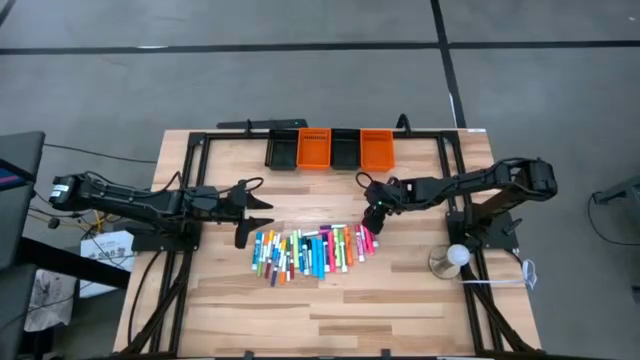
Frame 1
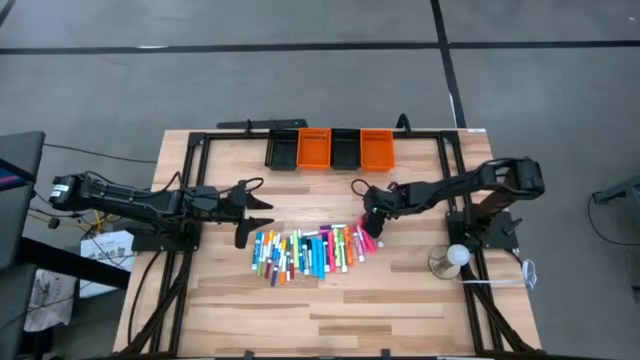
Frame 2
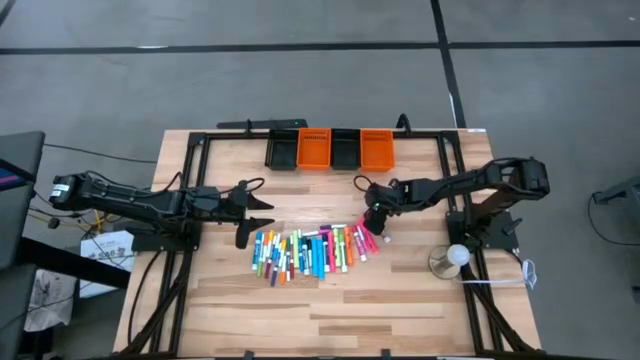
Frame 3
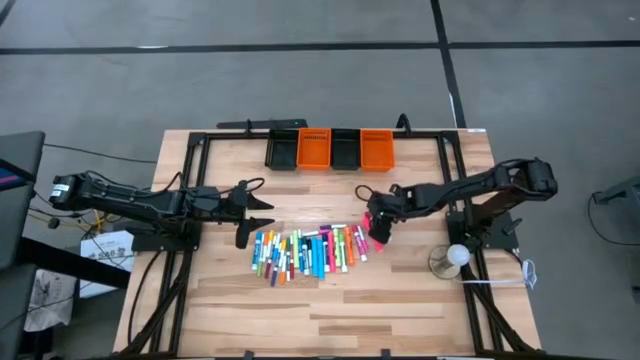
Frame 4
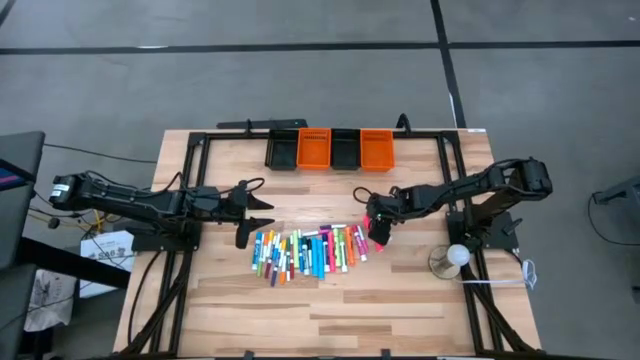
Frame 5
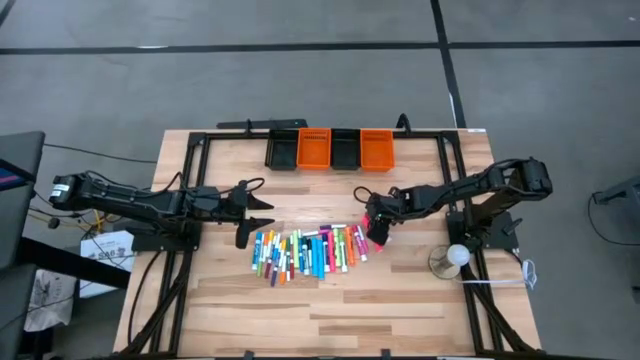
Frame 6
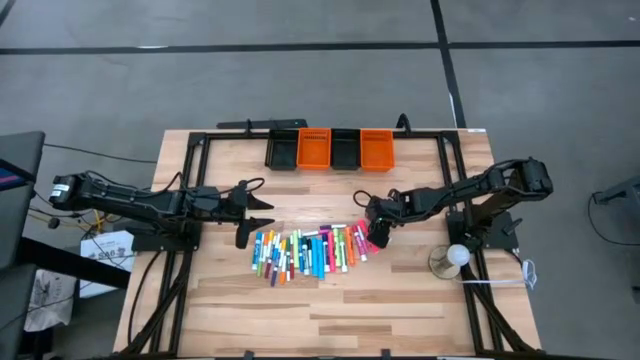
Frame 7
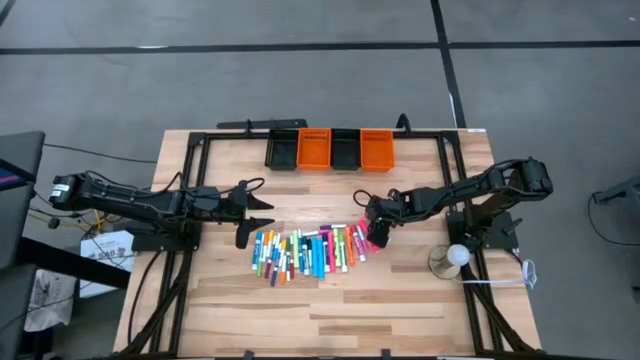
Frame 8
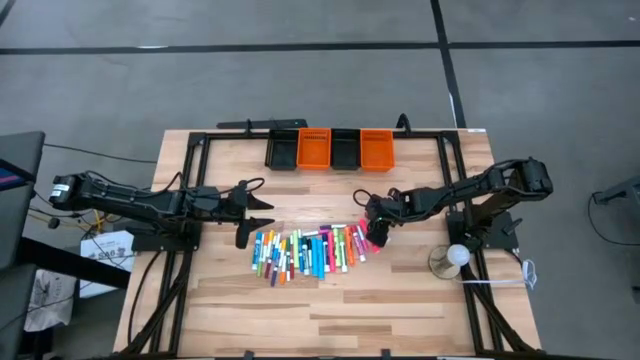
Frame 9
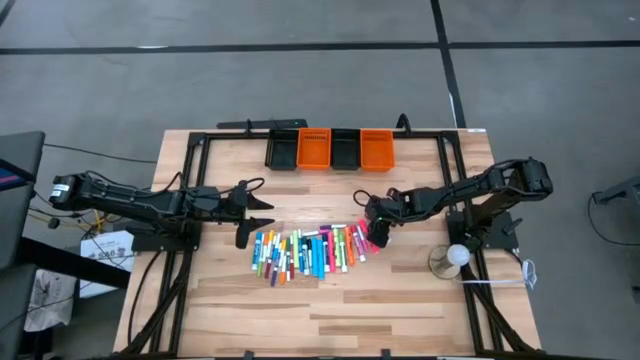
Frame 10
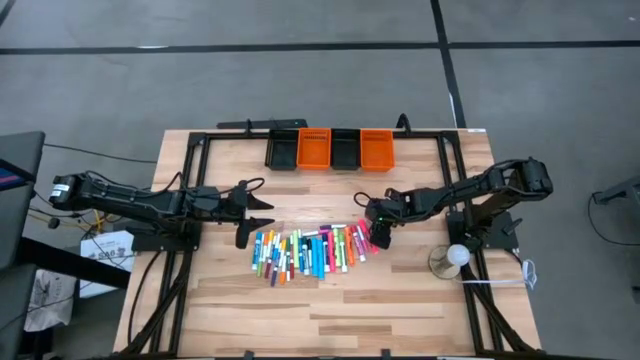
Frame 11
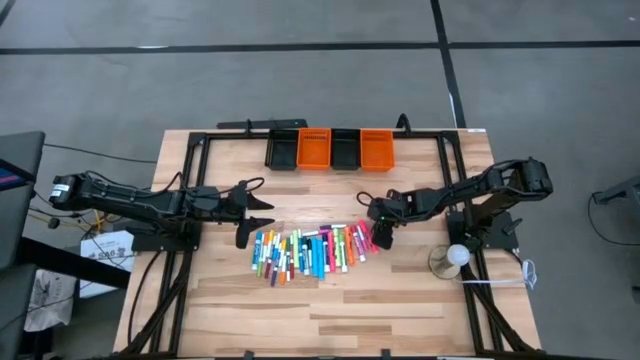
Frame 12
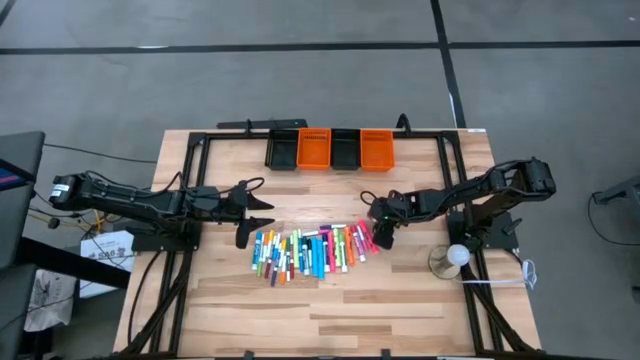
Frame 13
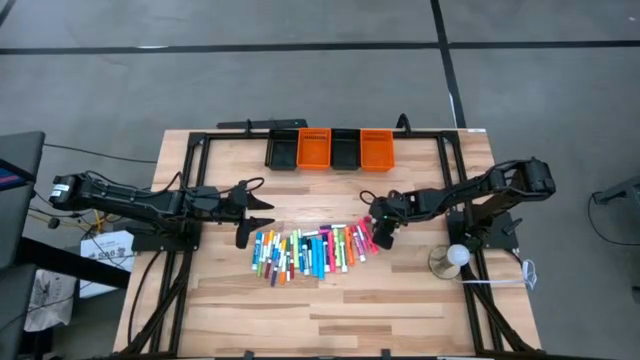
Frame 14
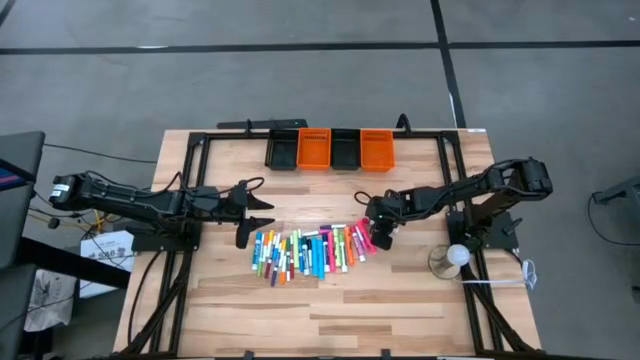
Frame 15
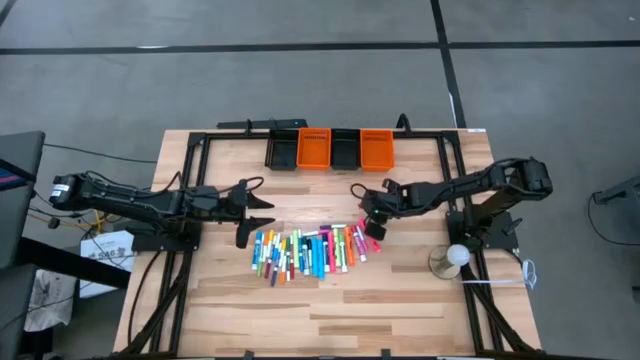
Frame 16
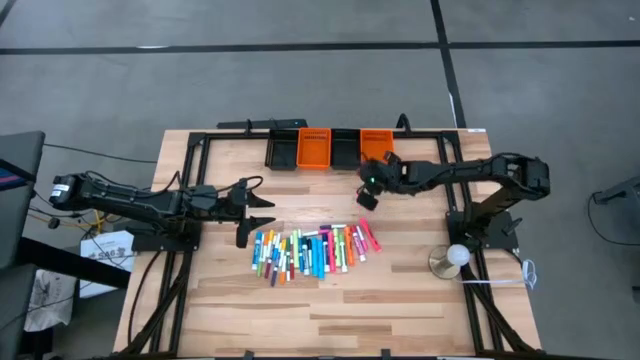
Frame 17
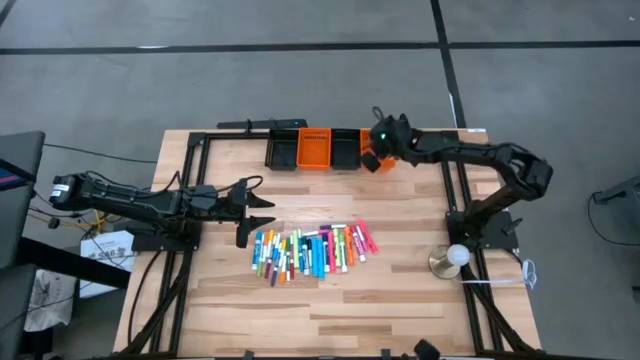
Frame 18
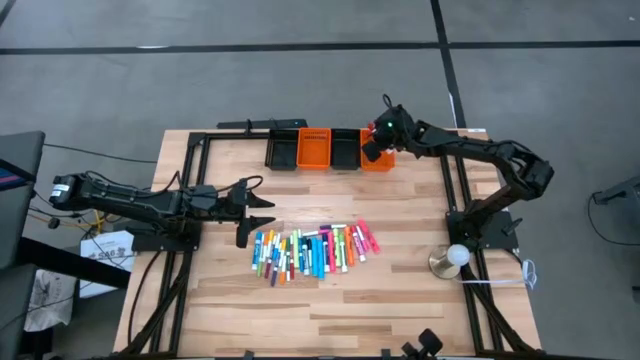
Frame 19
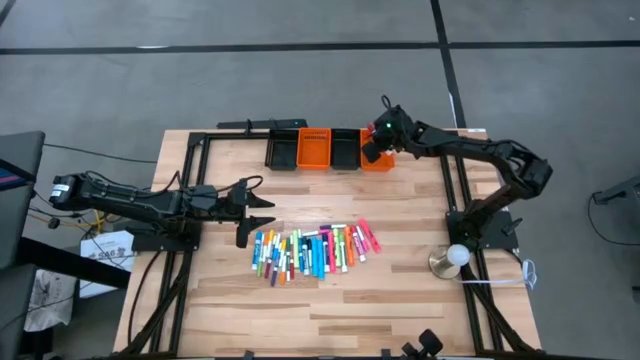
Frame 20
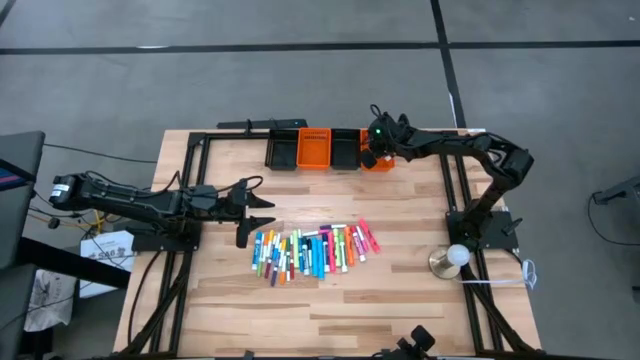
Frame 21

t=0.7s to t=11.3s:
Task: Pick & Place Markers
Put the red marker pen into the right orange bin

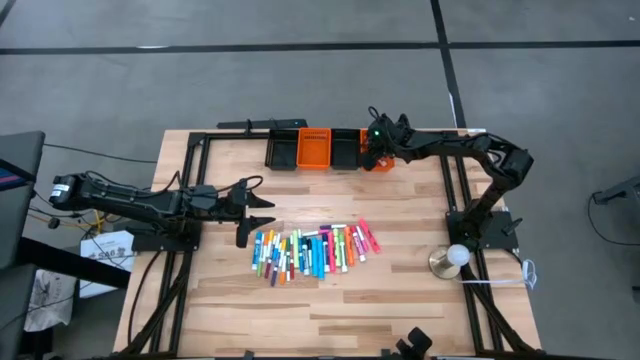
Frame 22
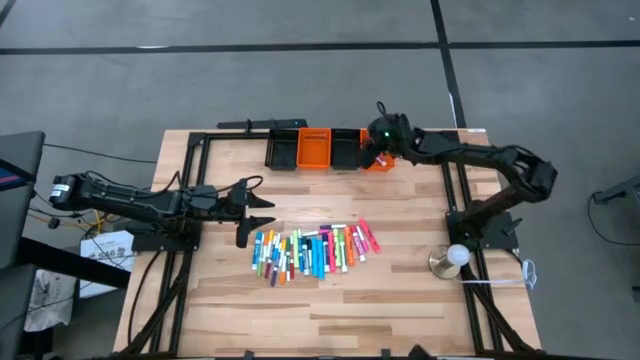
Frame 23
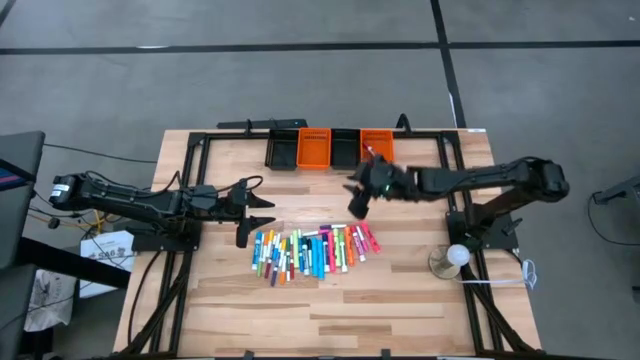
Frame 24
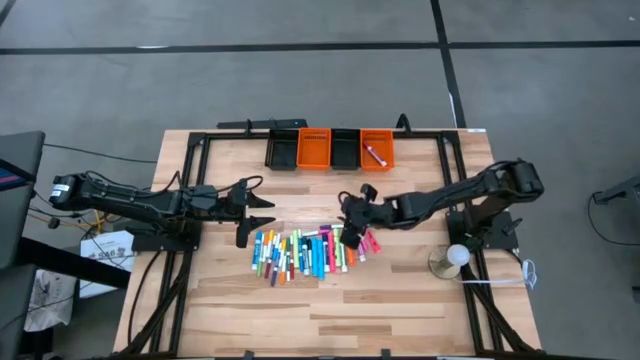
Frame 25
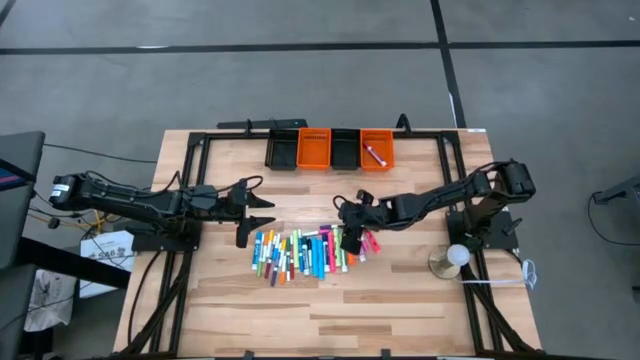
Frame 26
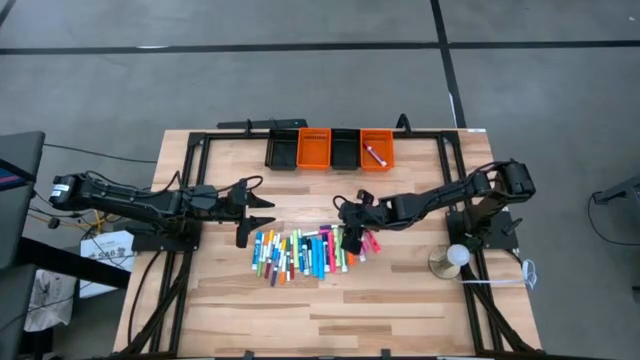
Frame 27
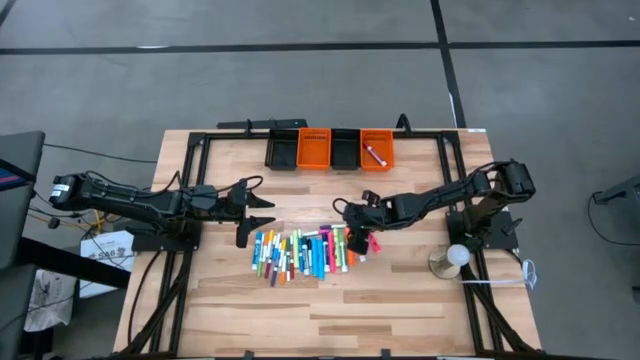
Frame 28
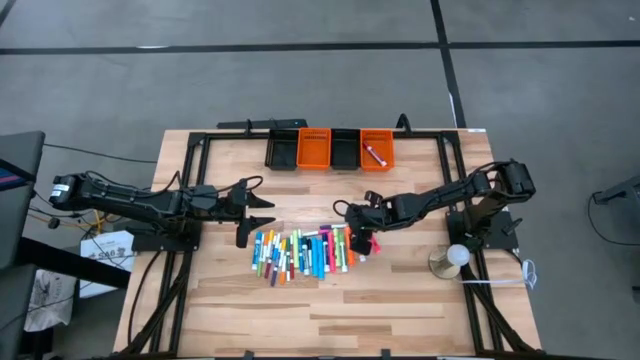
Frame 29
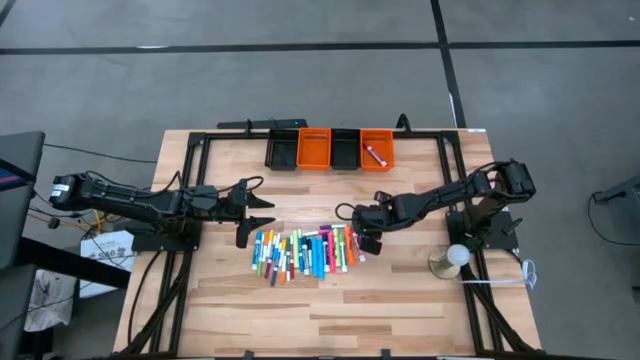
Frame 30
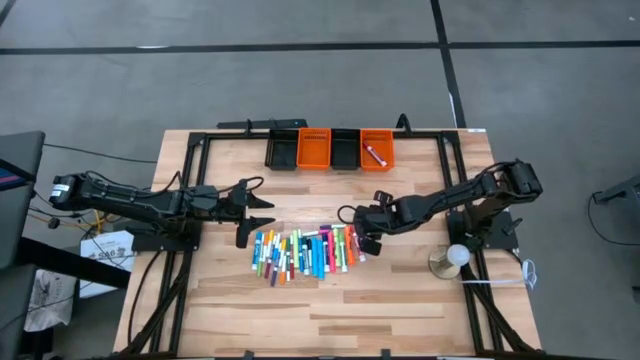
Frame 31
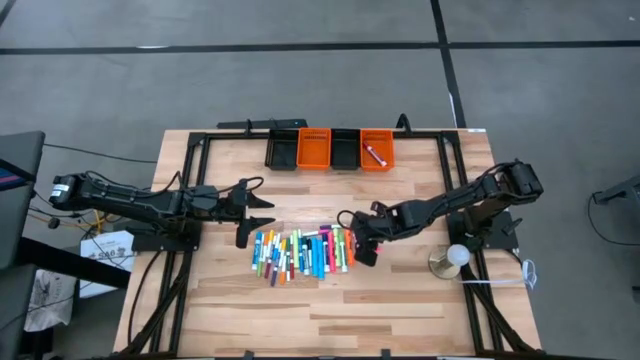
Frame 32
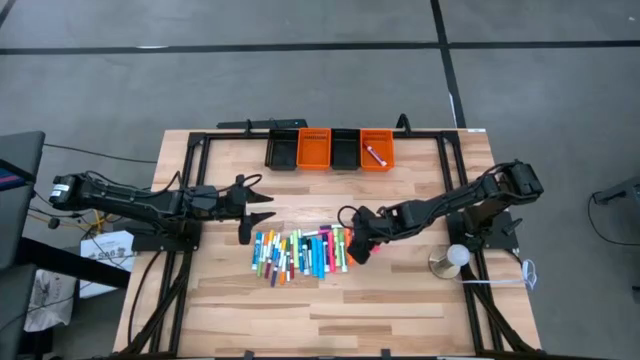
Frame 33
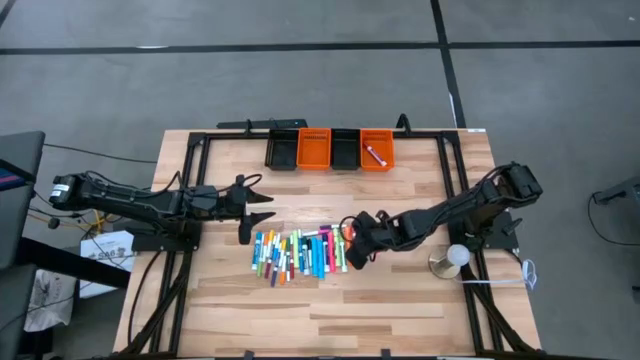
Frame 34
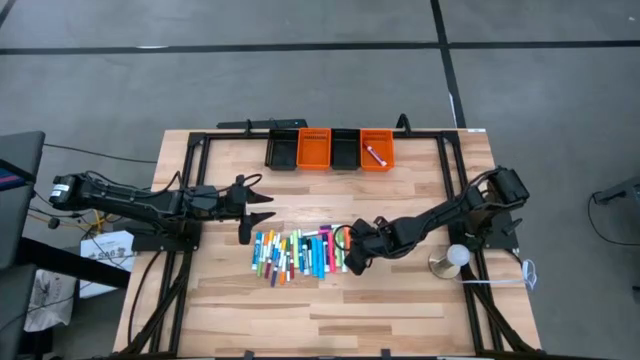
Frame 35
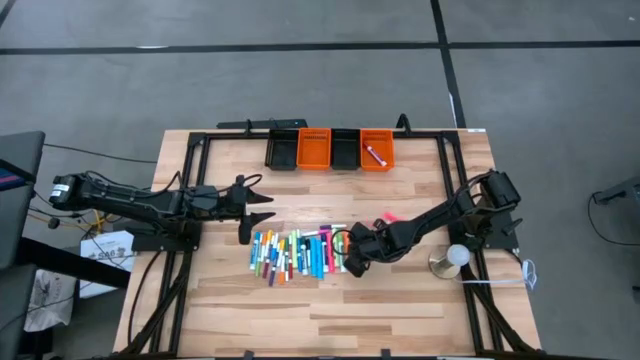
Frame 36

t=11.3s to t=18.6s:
Put the pink marker pen into the right orange bin

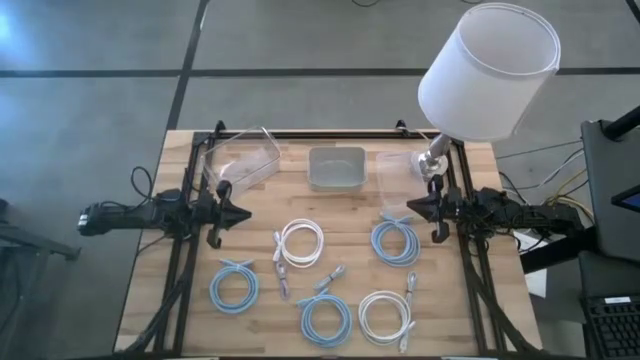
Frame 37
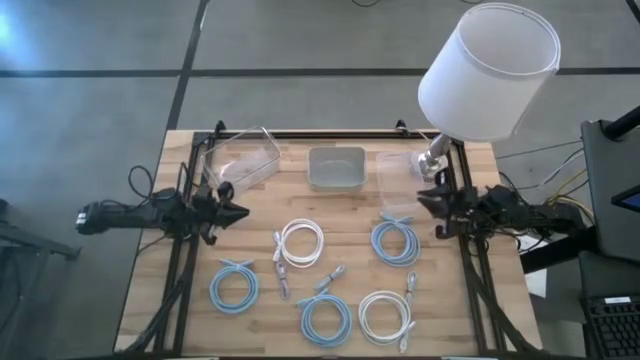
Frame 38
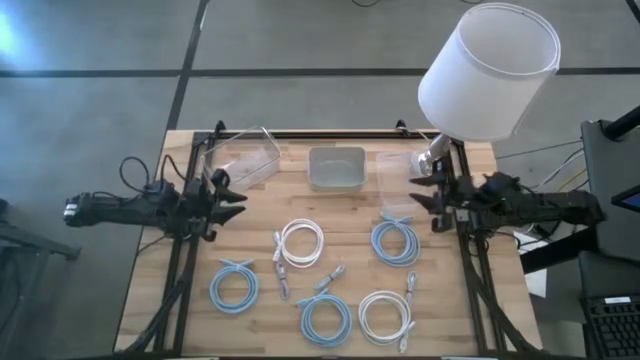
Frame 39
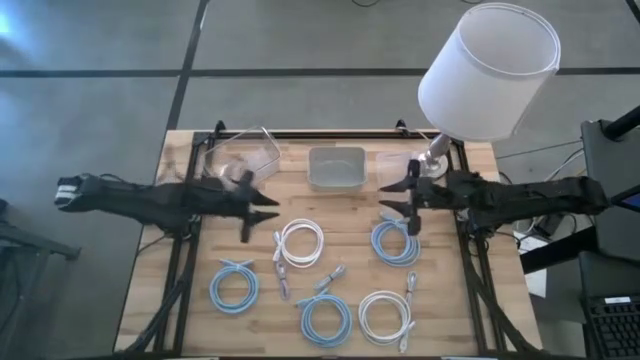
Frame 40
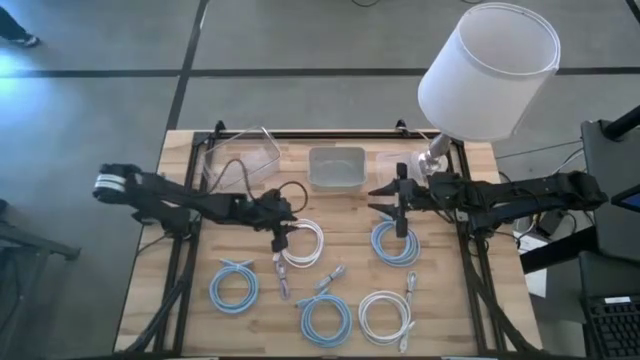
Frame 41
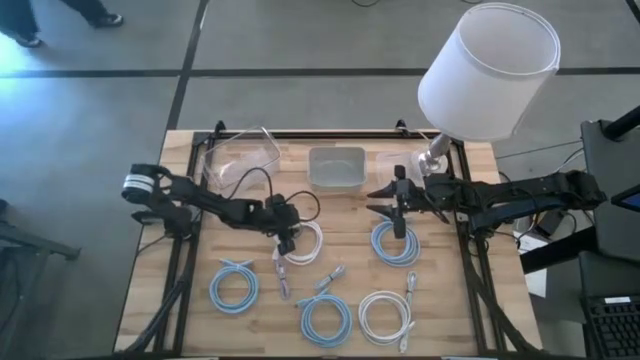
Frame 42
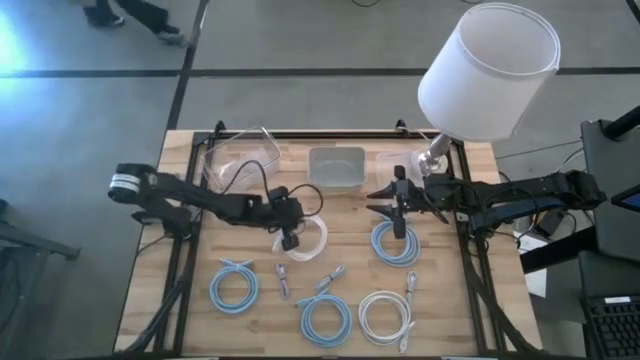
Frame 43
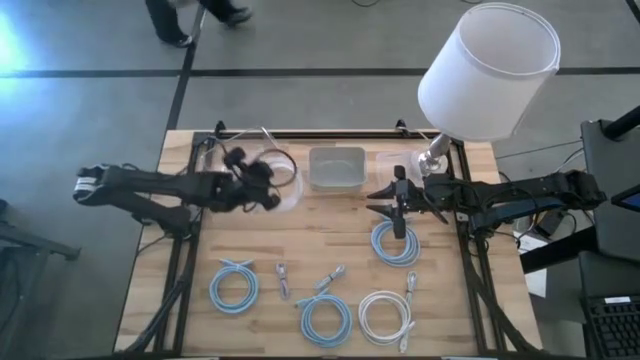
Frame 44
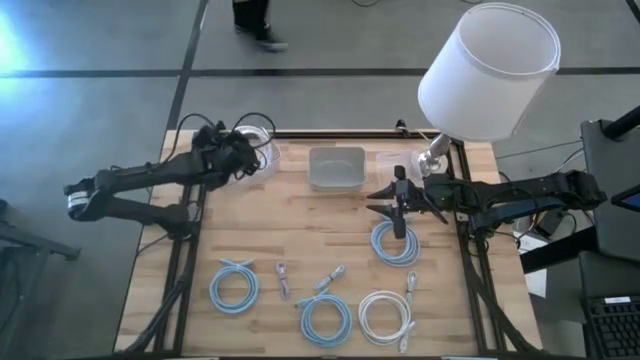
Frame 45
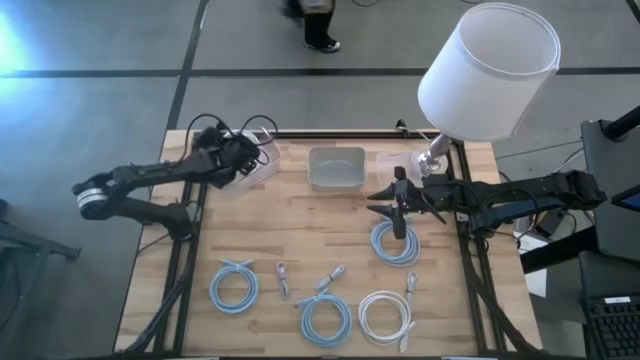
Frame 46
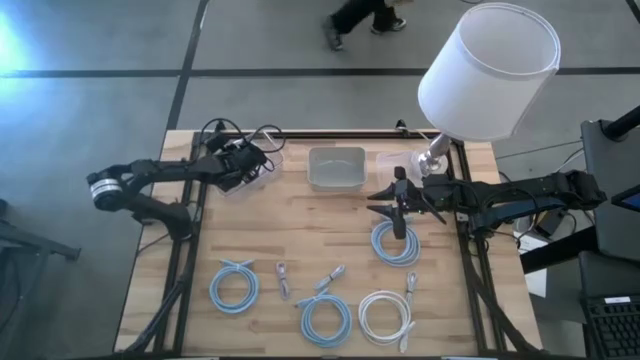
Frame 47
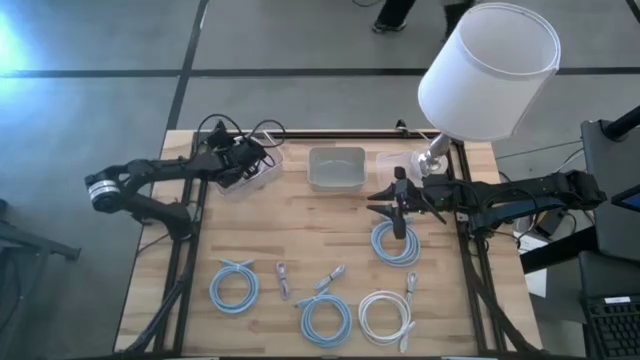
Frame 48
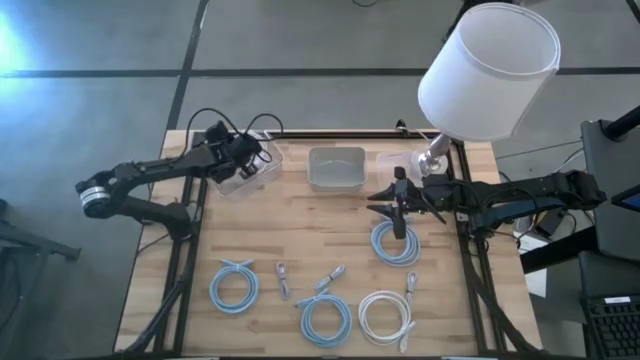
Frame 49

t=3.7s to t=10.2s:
Task: Pick & Place USB Port
Put the left large white charger cable into the left transparent bin
